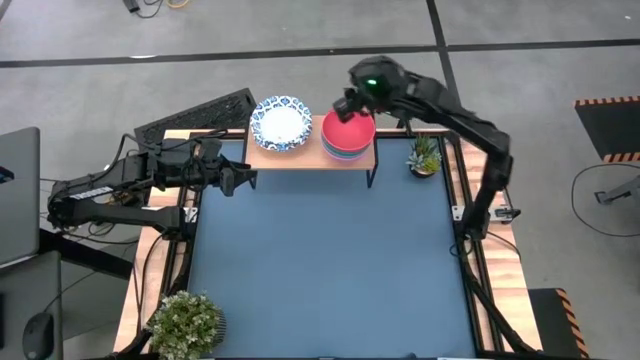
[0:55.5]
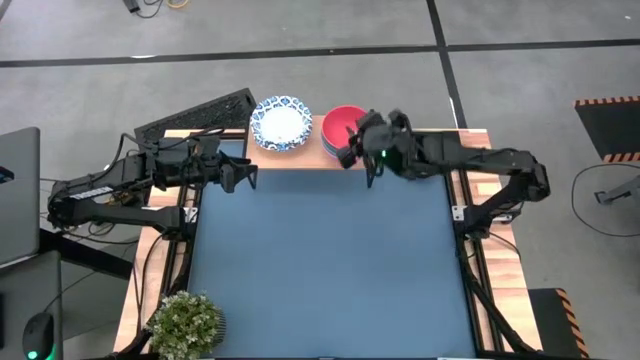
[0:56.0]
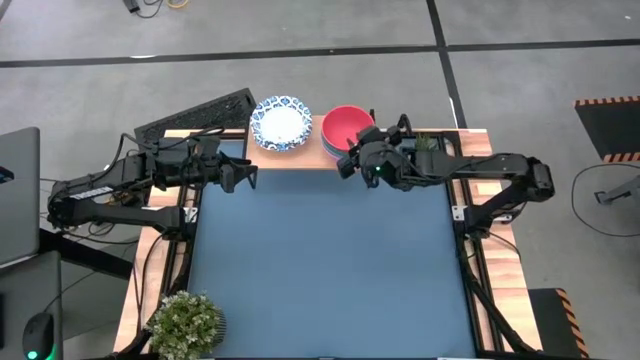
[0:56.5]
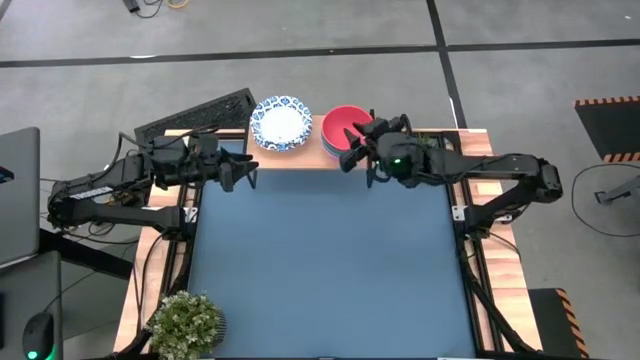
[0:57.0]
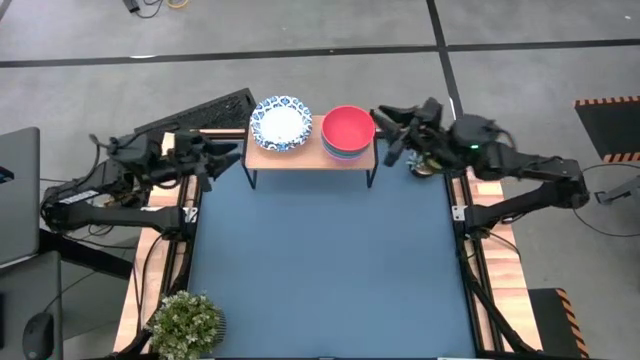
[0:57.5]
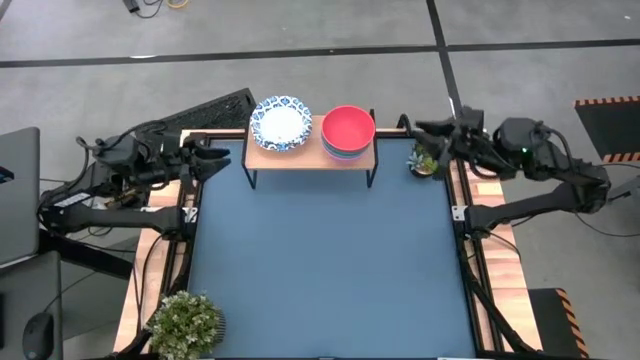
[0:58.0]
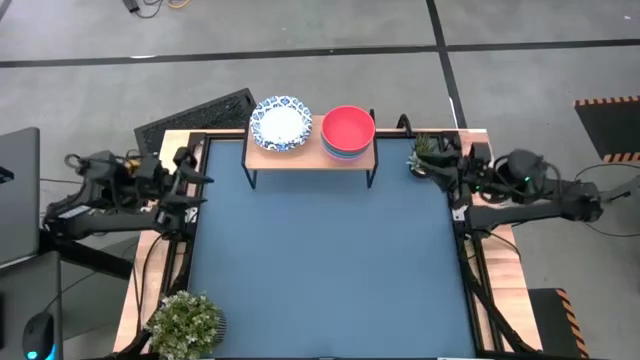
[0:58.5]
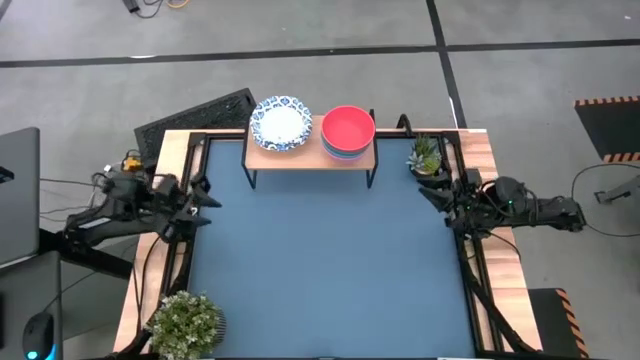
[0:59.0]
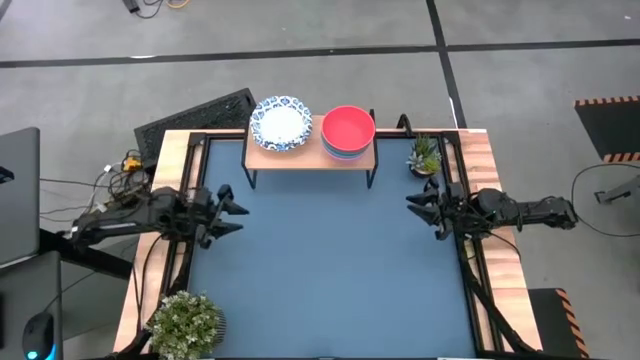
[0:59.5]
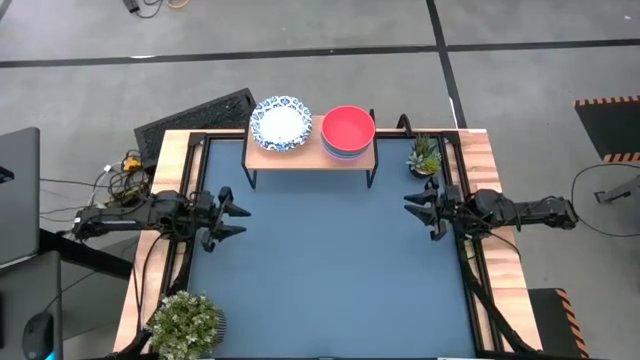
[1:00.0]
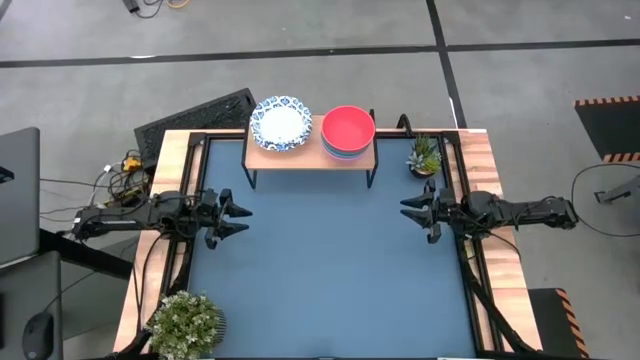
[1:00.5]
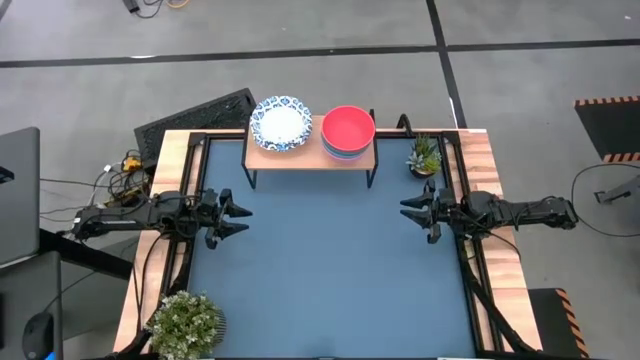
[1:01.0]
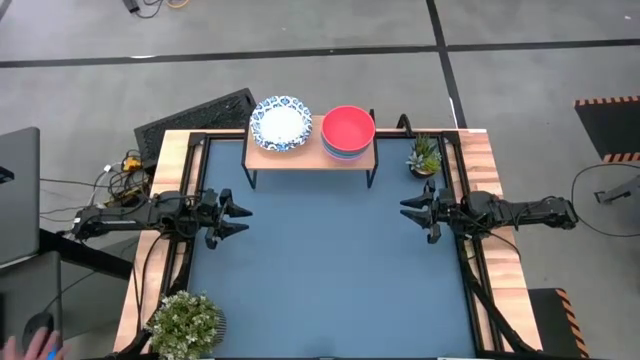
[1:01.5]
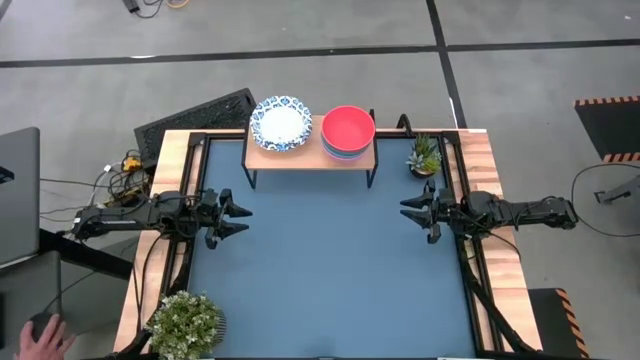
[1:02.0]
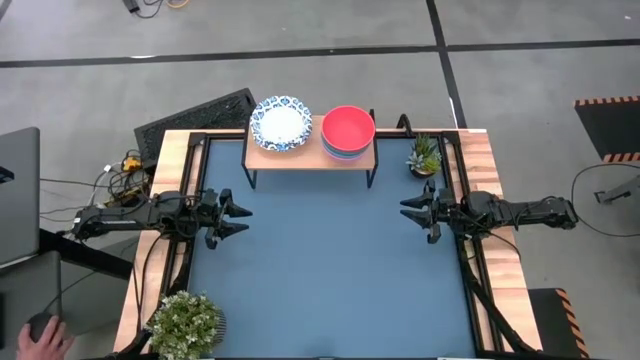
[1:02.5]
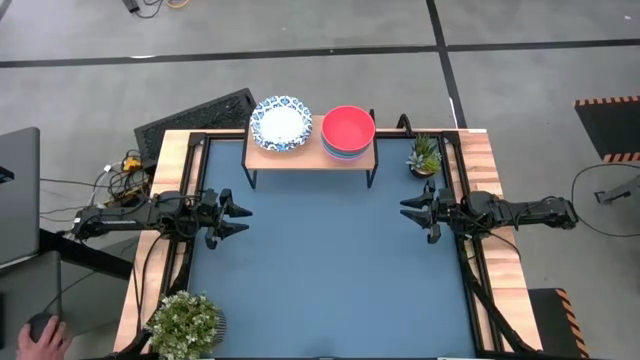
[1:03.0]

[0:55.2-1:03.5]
Task: Place and stack bowls onto a shelf
Return to Home Position

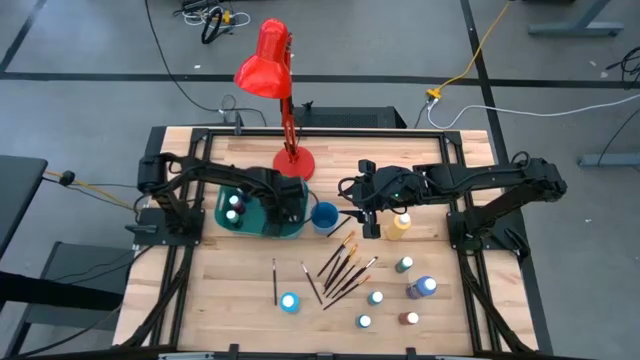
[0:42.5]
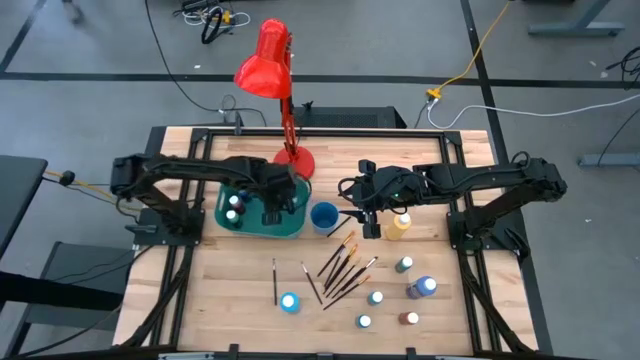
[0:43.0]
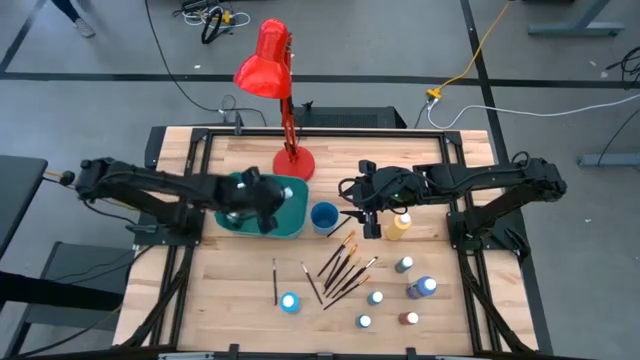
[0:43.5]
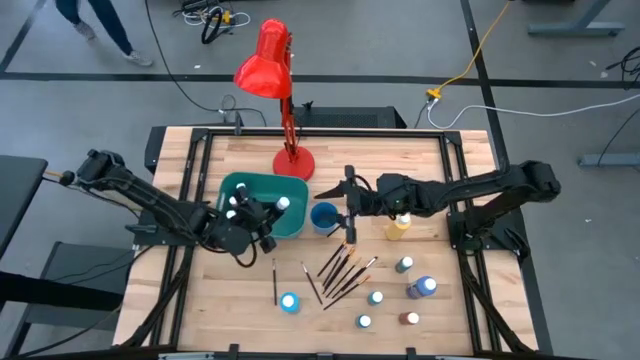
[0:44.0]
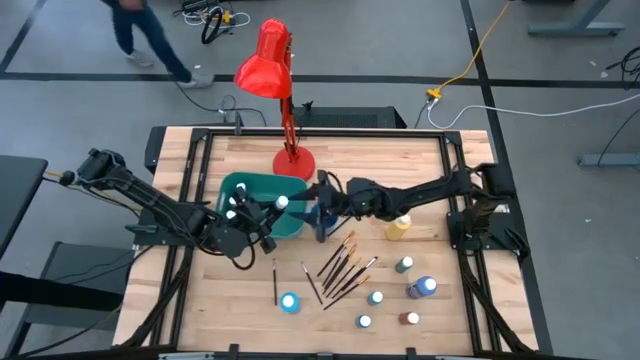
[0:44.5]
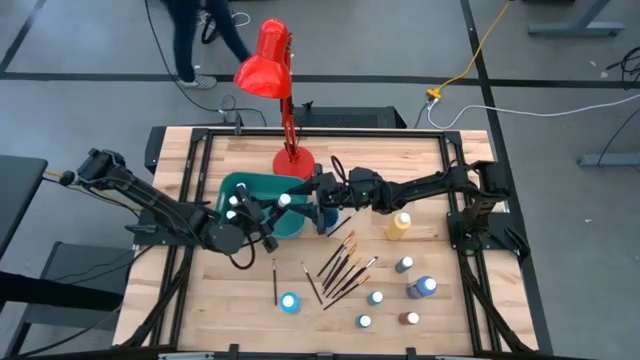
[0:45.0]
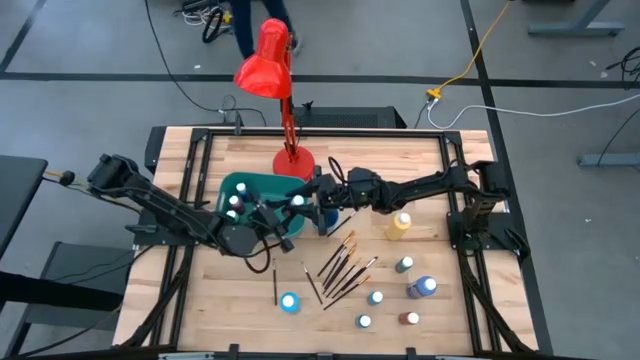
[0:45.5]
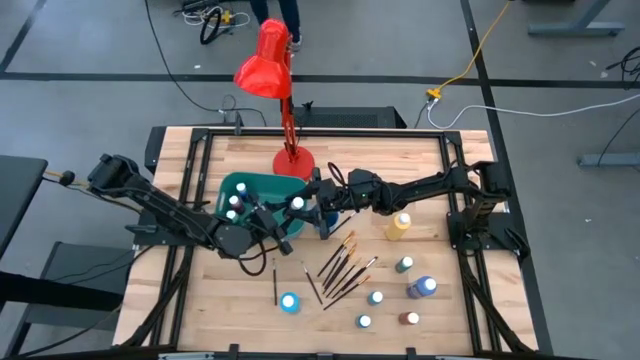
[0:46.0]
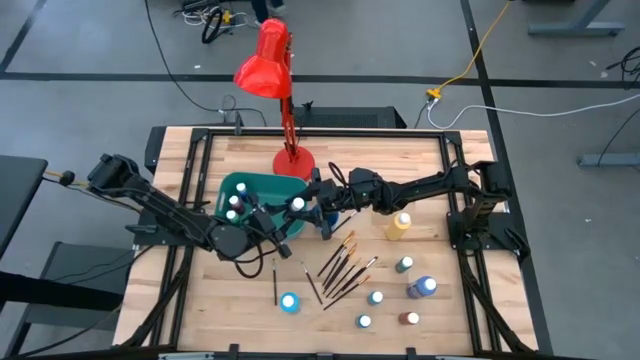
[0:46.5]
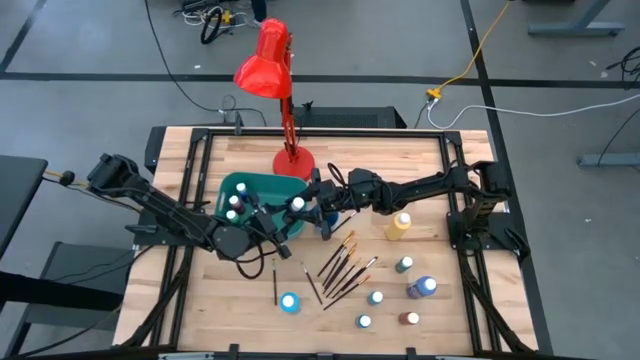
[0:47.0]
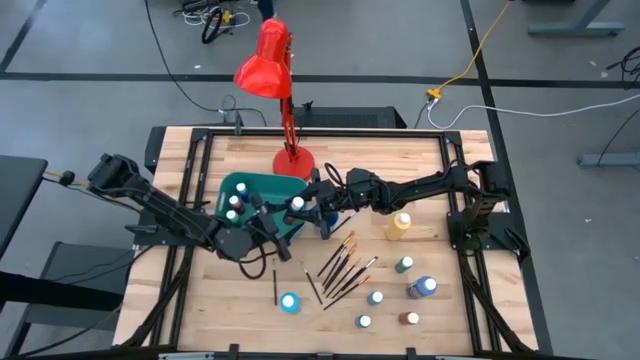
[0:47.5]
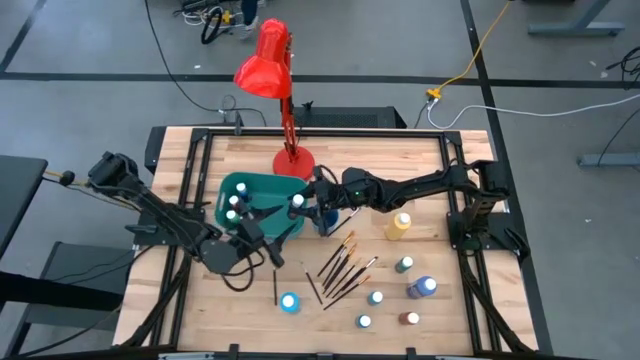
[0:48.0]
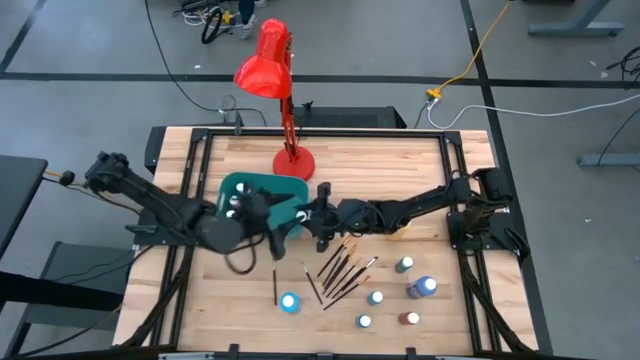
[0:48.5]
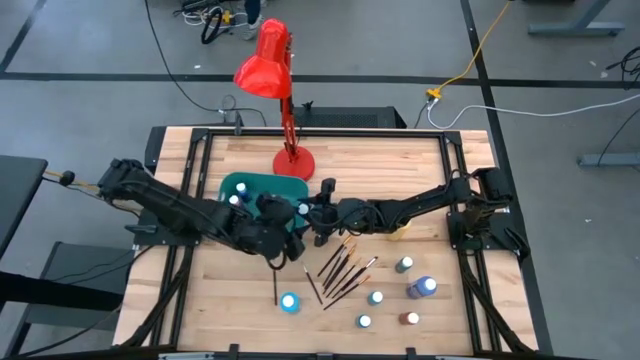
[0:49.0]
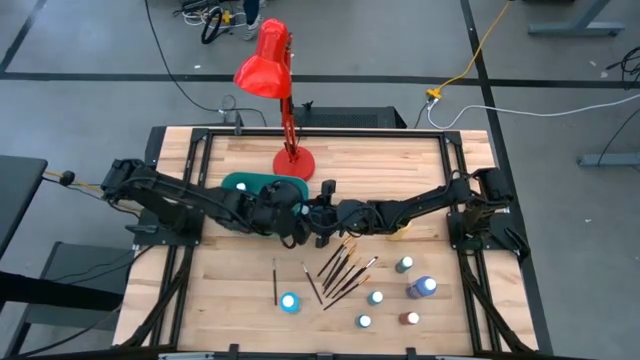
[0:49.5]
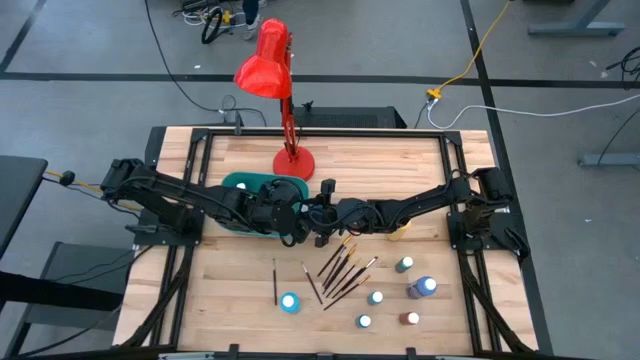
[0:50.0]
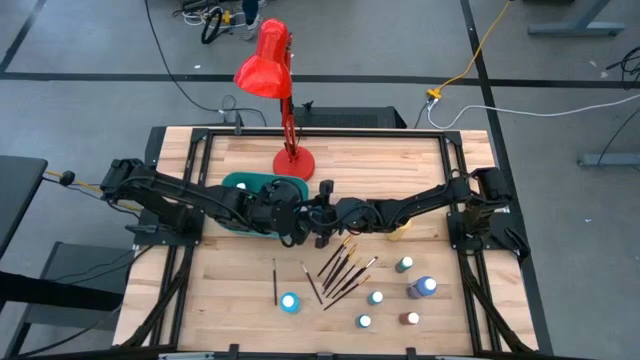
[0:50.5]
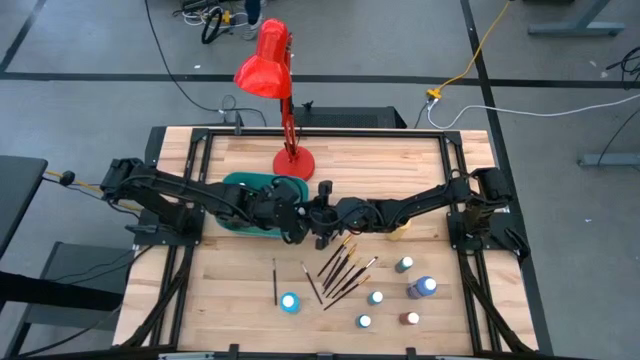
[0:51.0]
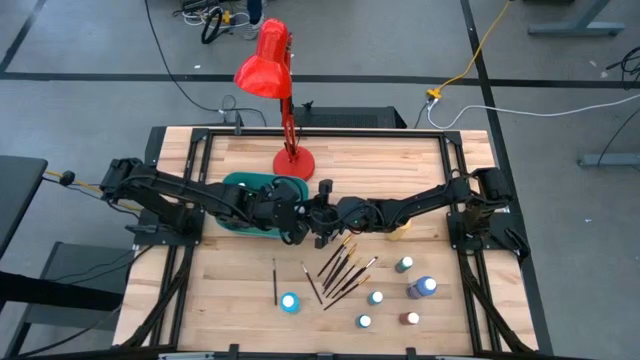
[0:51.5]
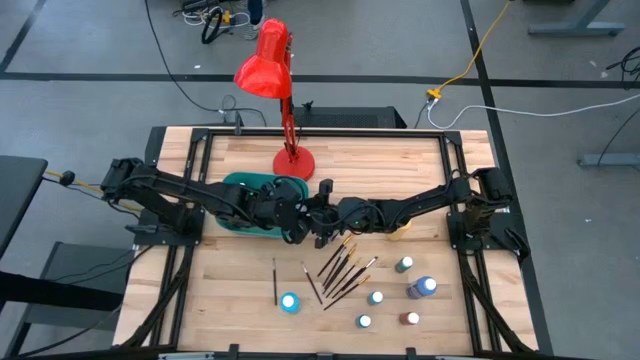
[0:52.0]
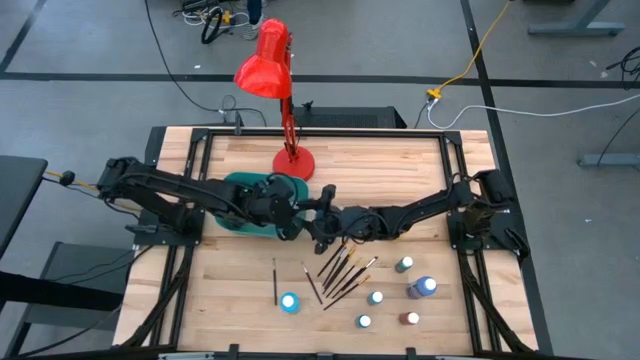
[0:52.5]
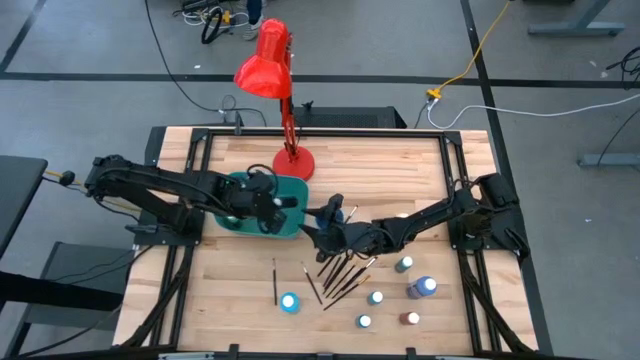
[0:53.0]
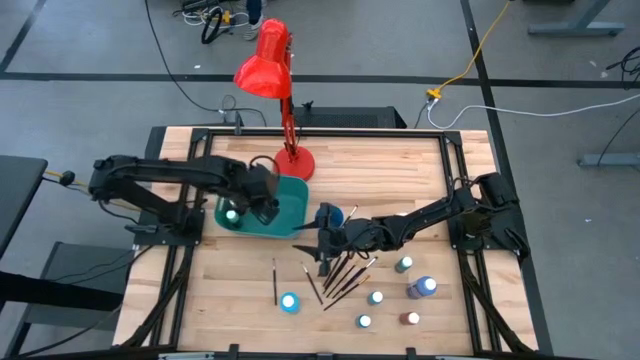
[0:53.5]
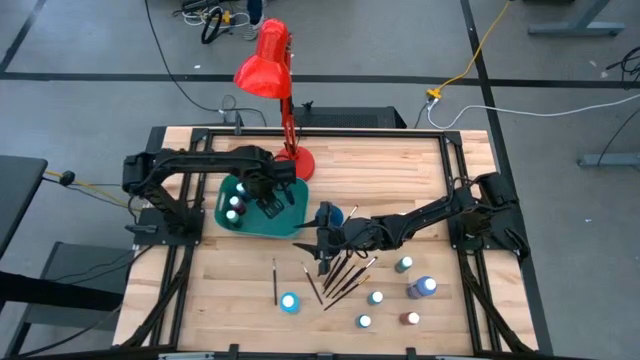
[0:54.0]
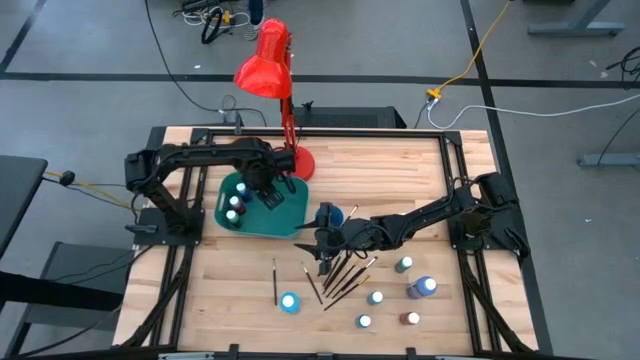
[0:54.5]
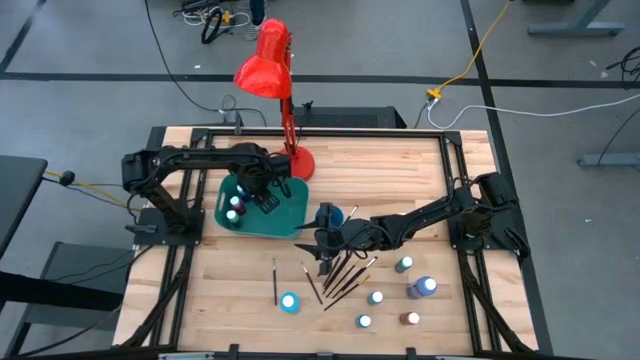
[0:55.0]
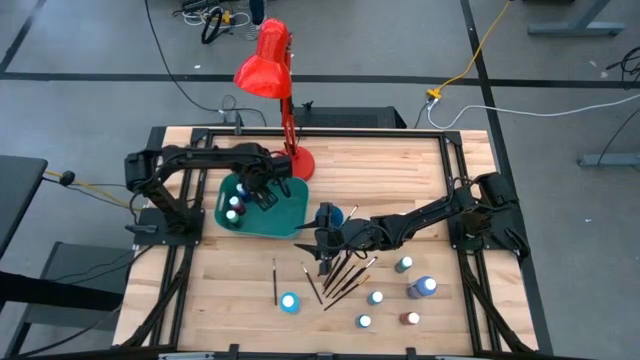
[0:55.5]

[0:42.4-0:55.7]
Task: Pick & Place Paint Supplies
Put the black paint bottle into the green bin
